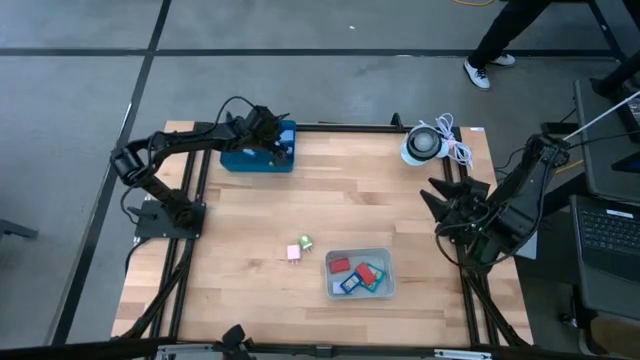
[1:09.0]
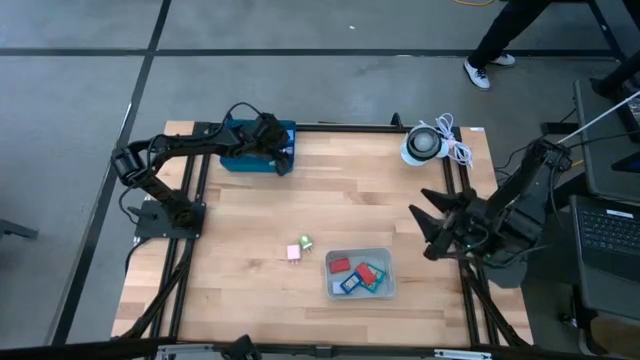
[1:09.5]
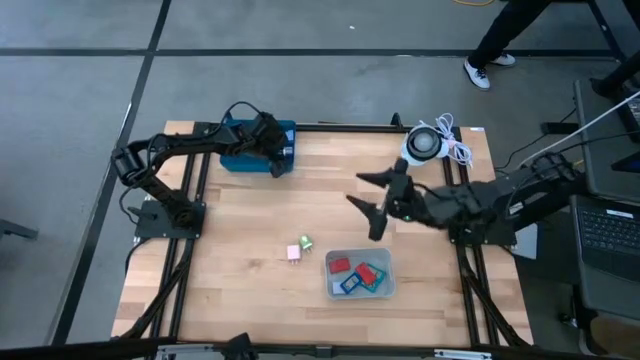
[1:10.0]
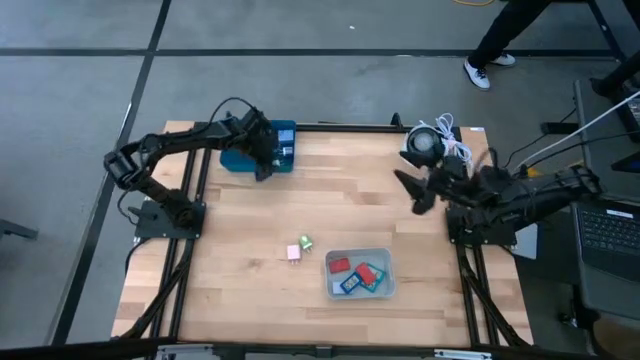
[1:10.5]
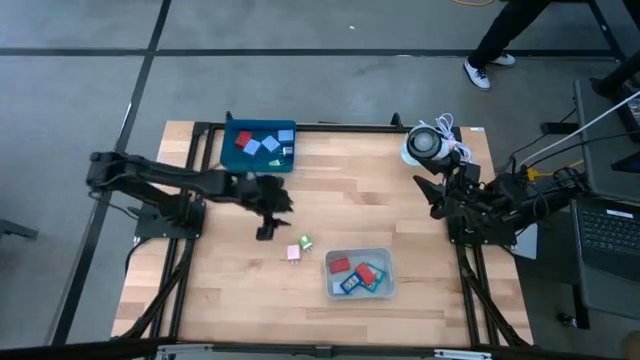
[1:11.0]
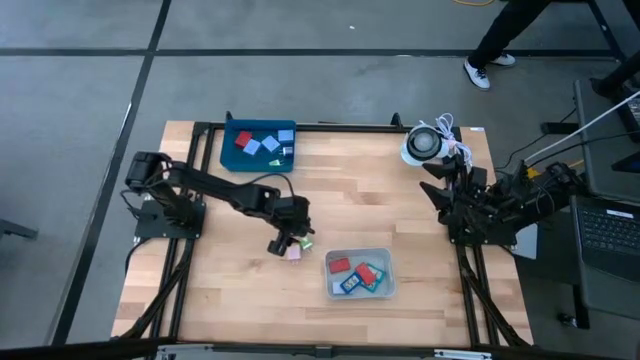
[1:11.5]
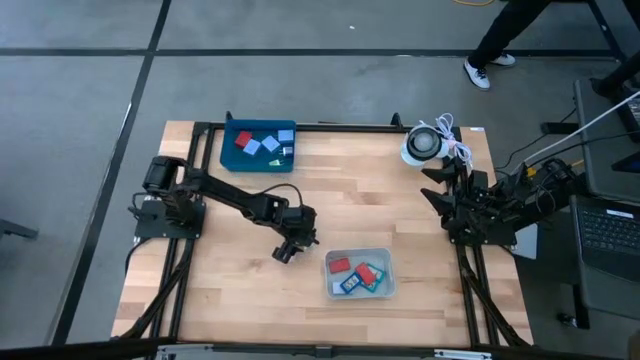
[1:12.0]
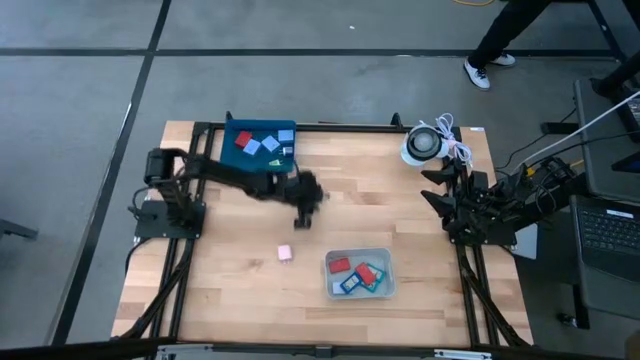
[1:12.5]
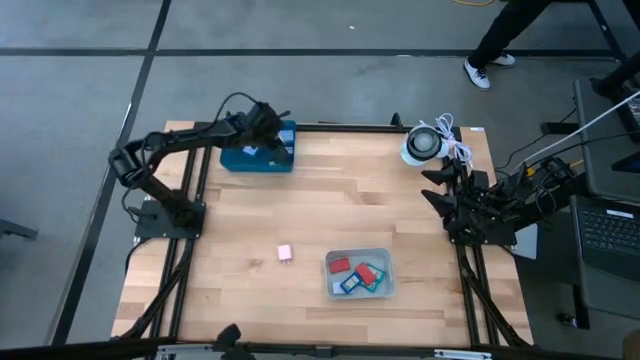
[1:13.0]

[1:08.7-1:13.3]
Task: Pick & Place Office items
Put the green adapter into the blue bin

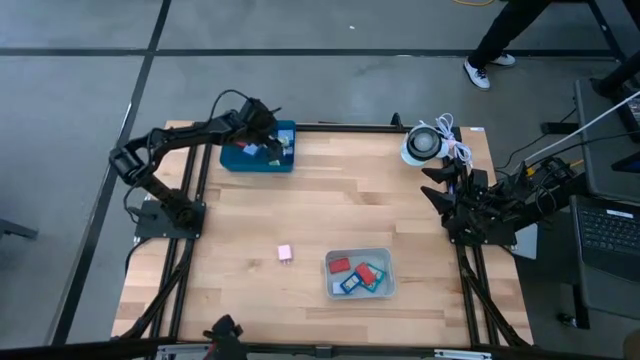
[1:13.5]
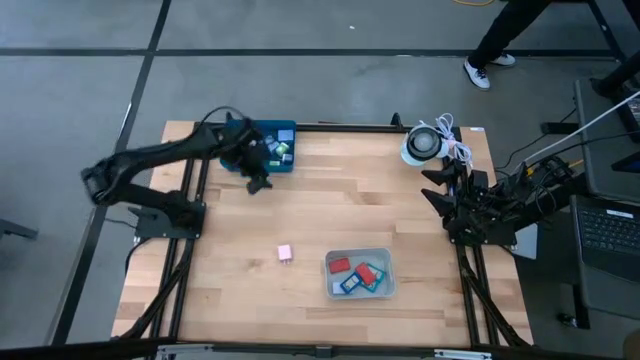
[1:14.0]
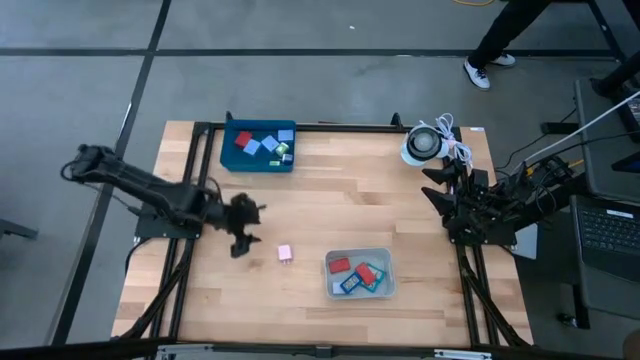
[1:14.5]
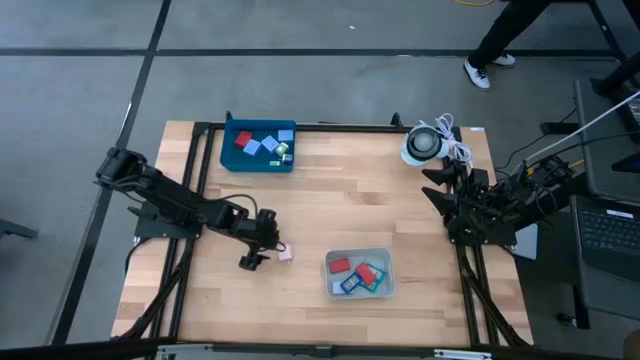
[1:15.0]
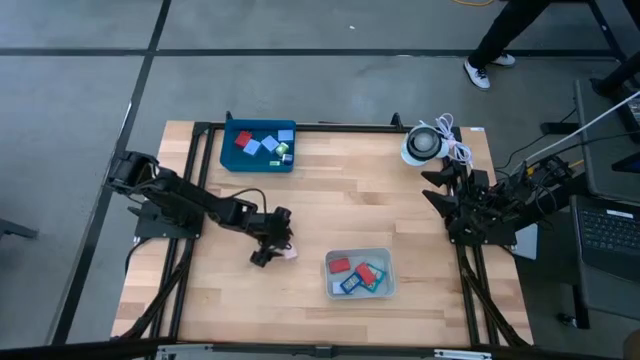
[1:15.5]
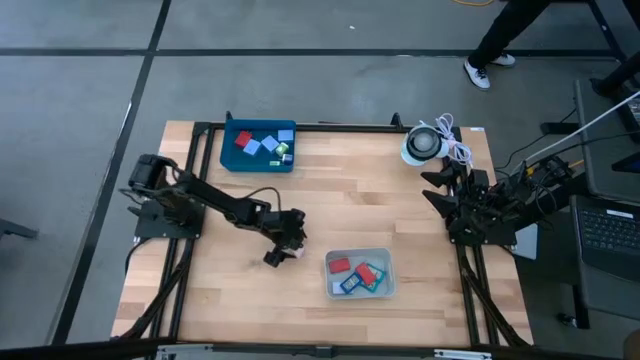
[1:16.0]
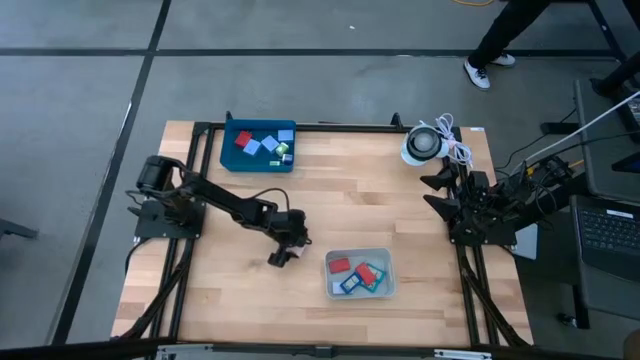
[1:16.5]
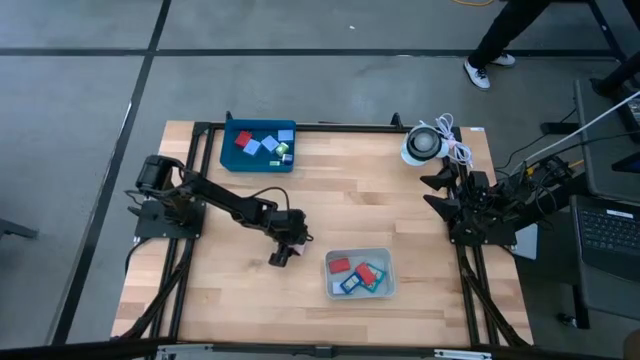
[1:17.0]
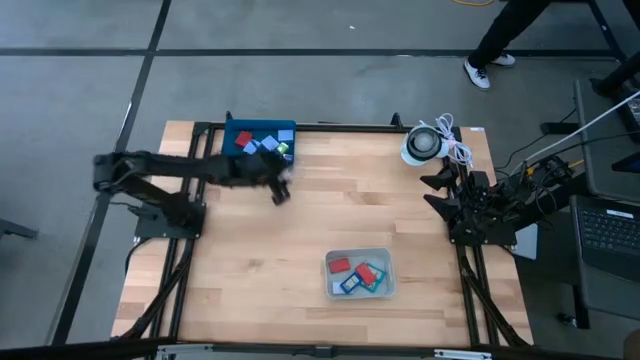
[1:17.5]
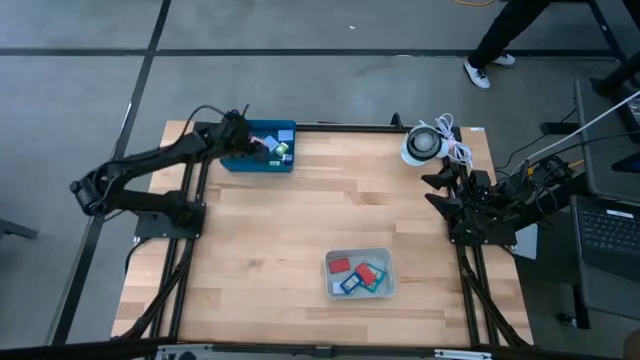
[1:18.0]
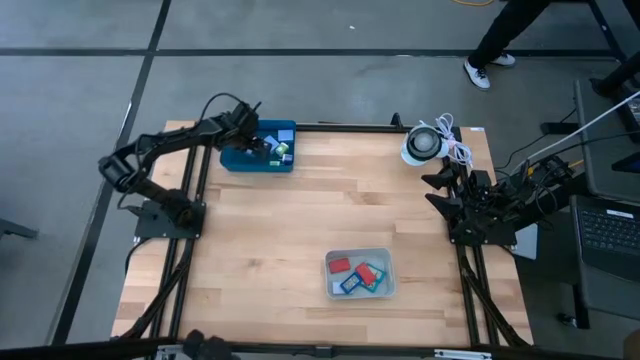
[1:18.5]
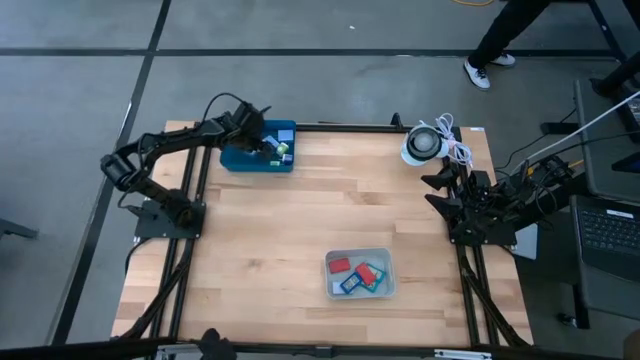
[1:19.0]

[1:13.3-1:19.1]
Put the pink charger adapter into the blue bin

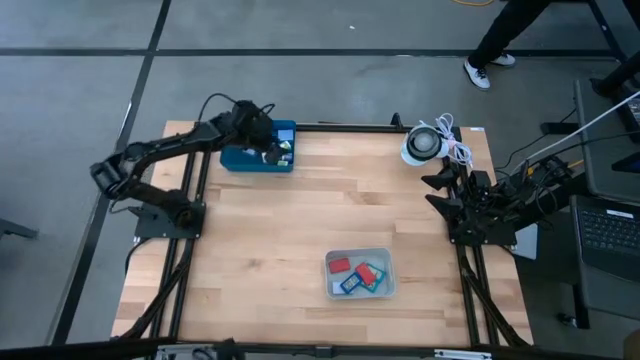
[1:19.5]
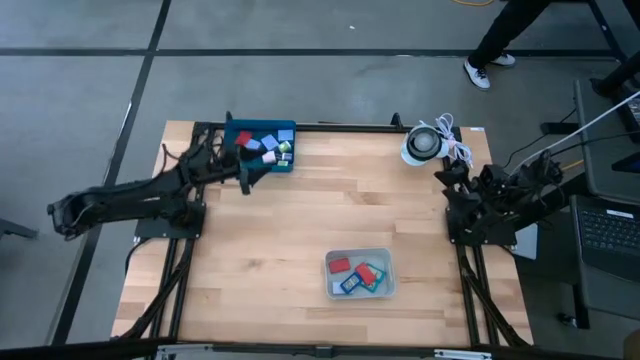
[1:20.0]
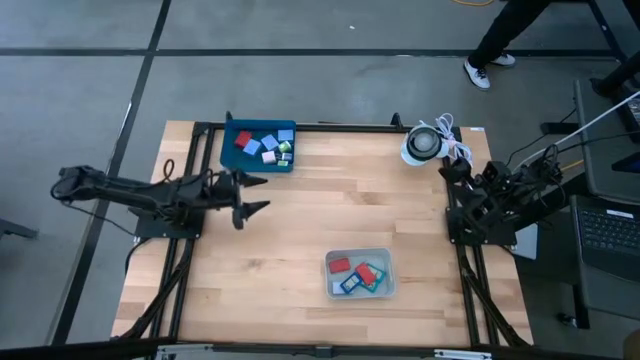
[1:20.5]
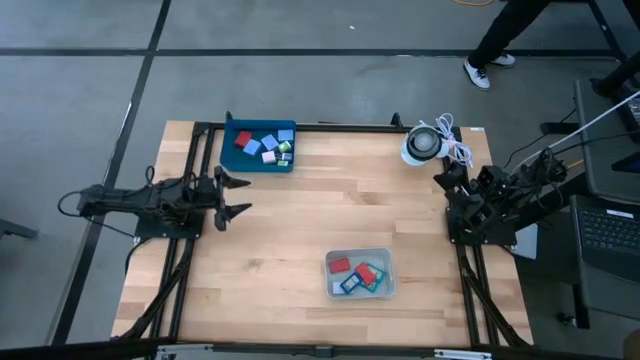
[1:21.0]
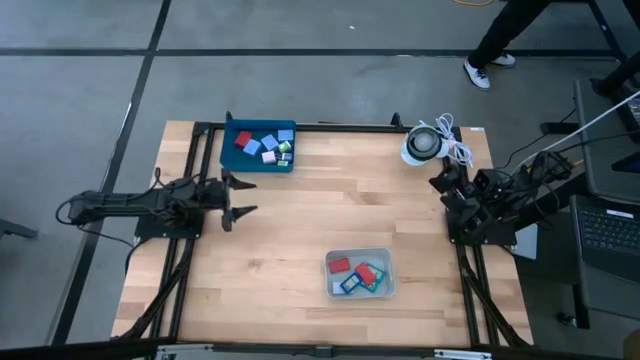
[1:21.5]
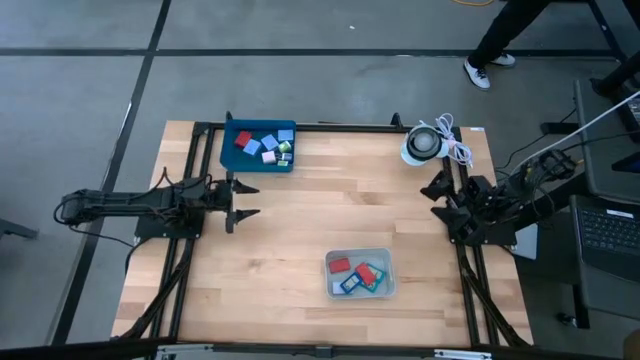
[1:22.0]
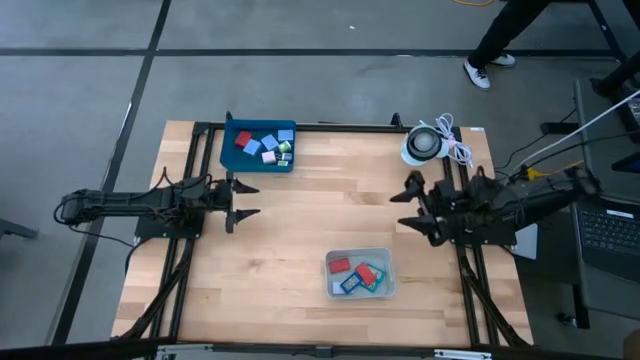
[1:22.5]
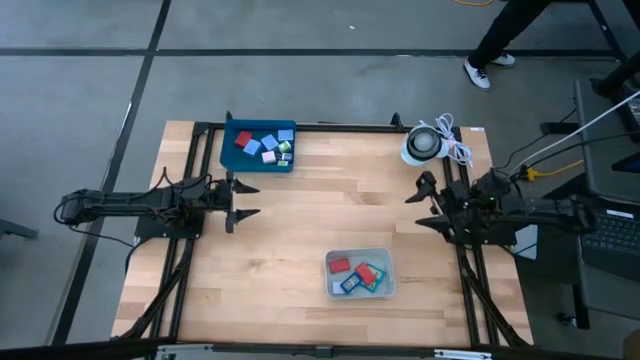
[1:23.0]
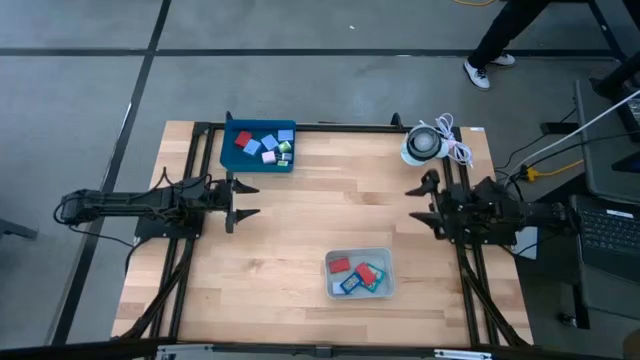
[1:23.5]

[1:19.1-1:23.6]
Return to Home Position

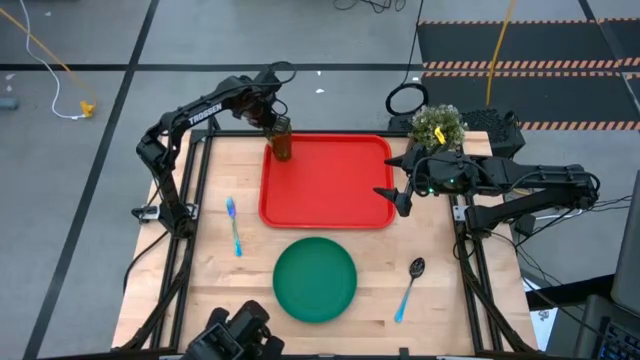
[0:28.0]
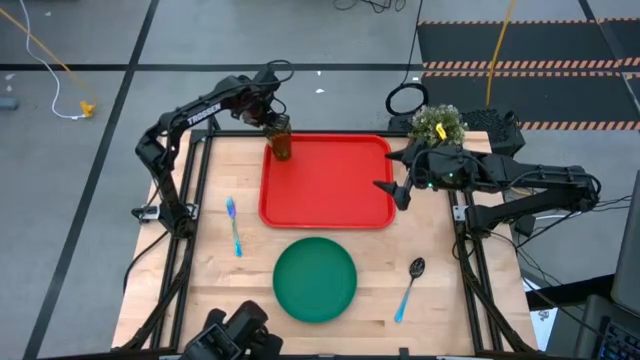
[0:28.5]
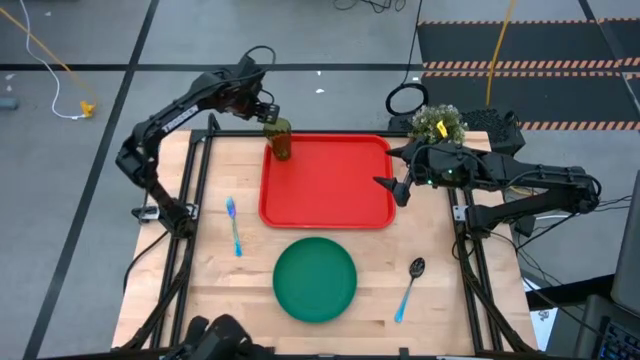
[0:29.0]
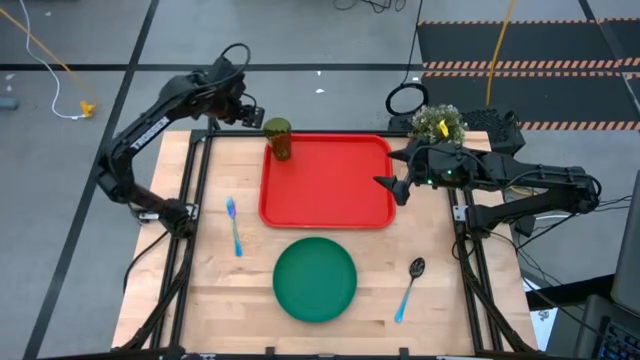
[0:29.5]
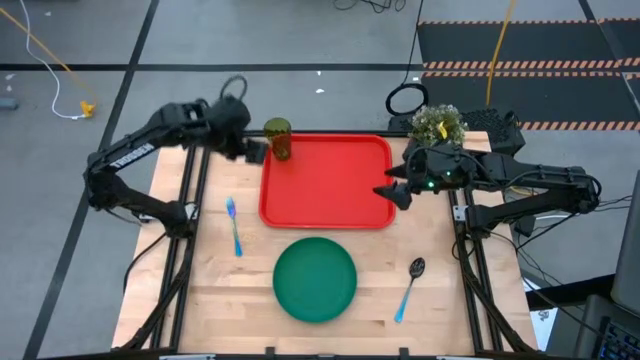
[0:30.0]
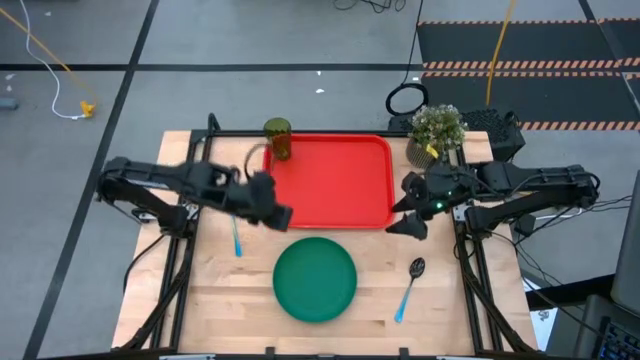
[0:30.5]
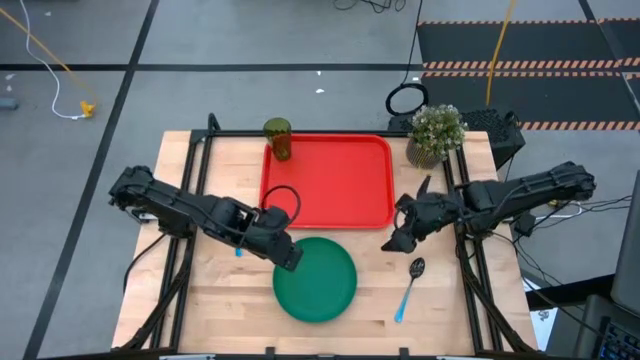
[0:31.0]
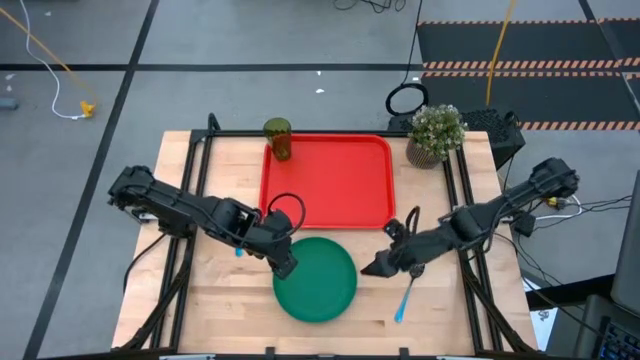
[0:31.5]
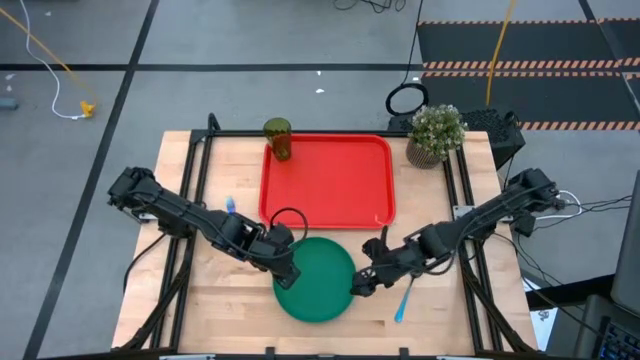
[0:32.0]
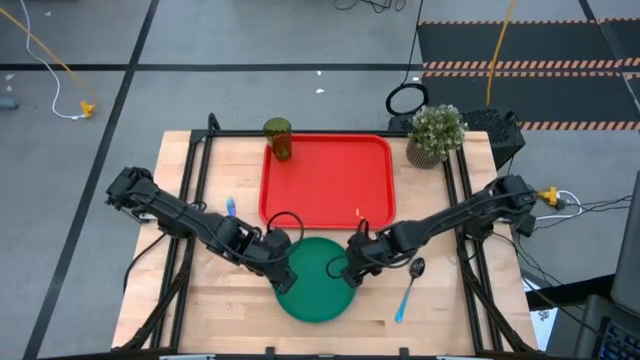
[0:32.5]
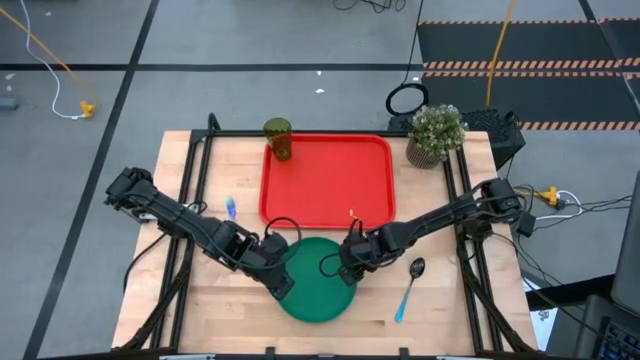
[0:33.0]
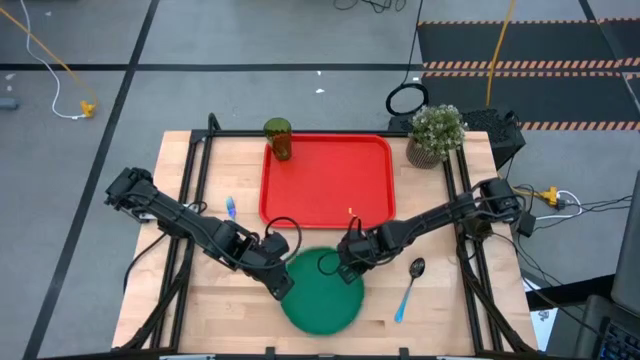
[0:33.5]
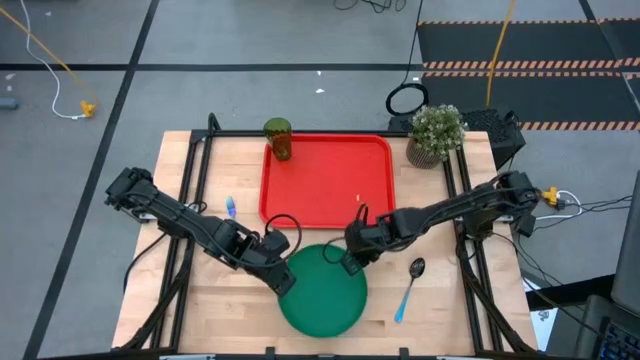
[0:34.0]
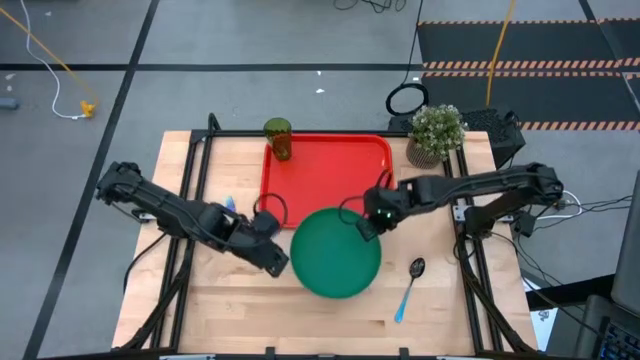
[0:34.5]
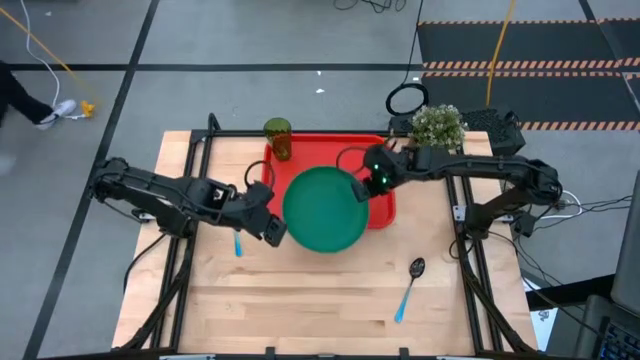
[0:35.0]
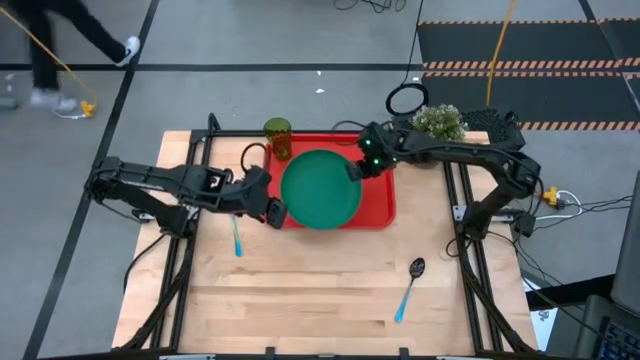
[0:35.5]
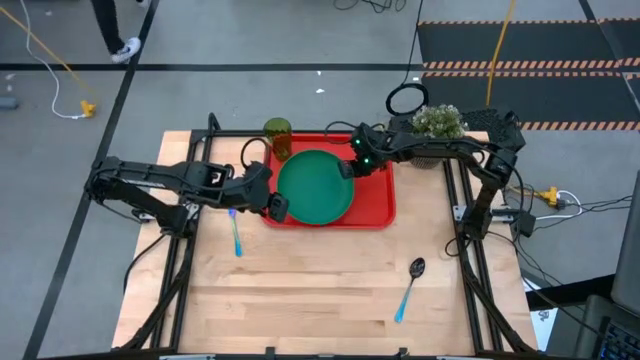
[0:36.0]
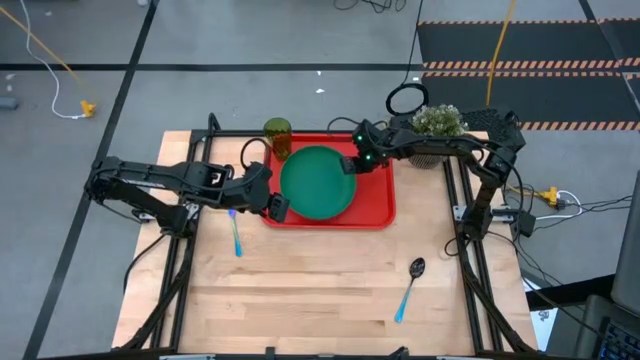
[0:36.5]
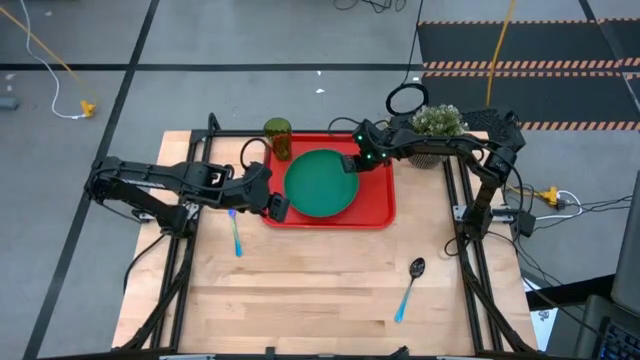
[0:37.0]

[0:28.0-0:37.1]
Task: Pick and place plate/cup/fork/spoon on tray
Put the green plate on the orange serving tray to the bottom right of the green glass
